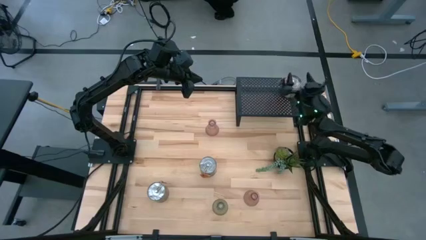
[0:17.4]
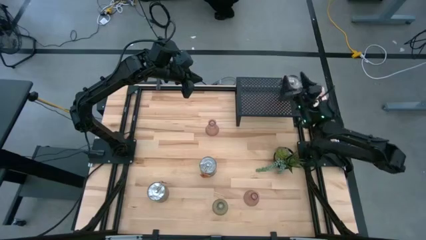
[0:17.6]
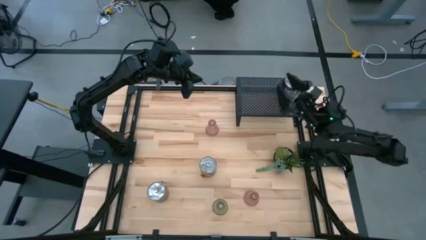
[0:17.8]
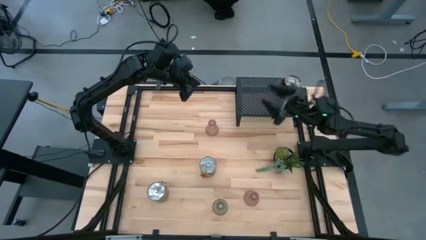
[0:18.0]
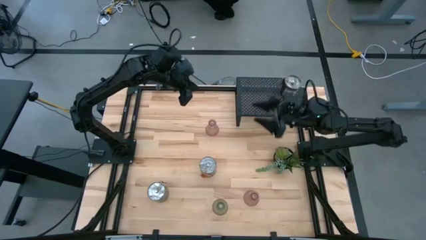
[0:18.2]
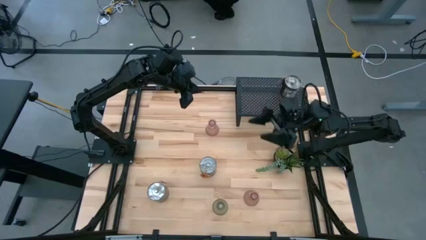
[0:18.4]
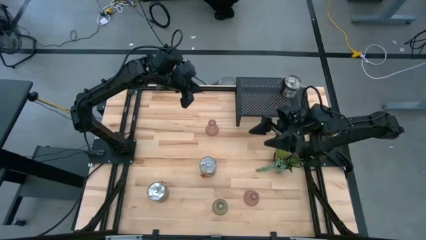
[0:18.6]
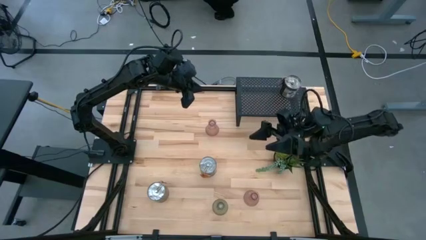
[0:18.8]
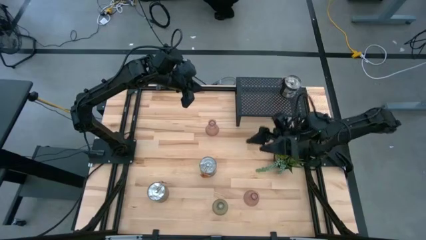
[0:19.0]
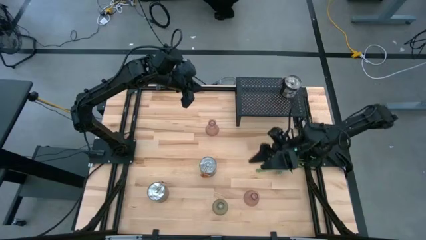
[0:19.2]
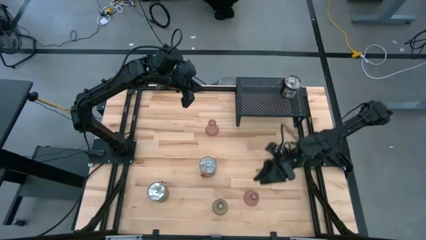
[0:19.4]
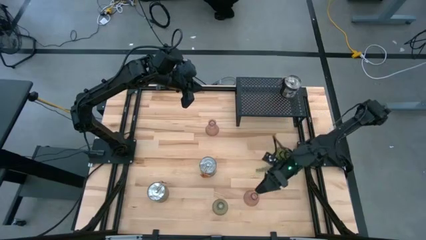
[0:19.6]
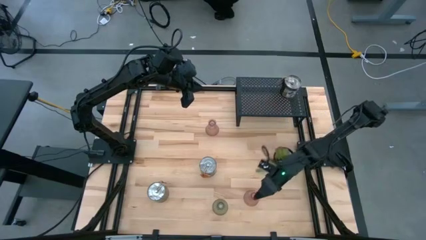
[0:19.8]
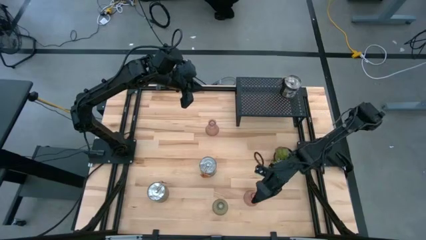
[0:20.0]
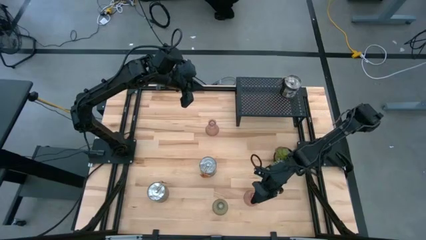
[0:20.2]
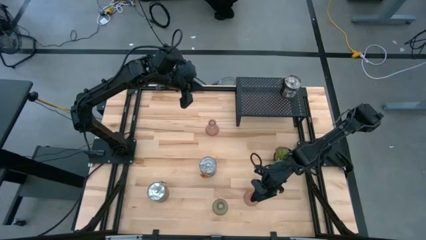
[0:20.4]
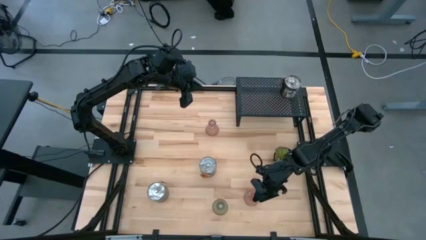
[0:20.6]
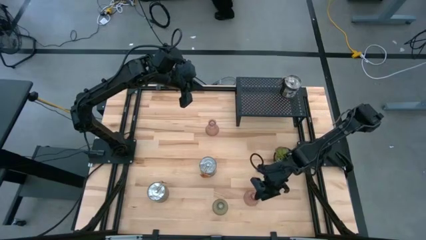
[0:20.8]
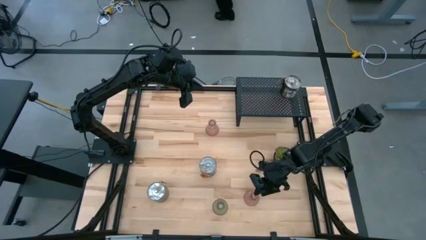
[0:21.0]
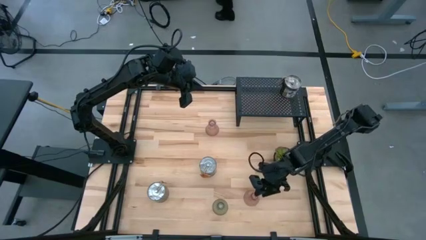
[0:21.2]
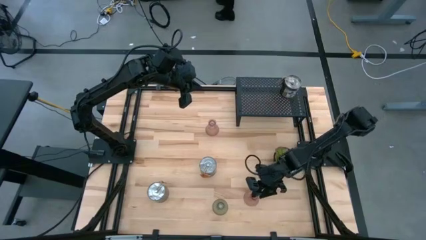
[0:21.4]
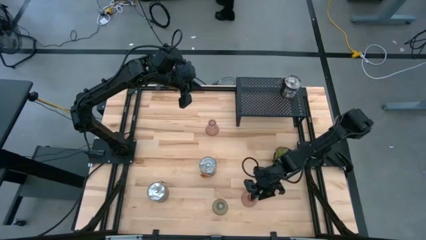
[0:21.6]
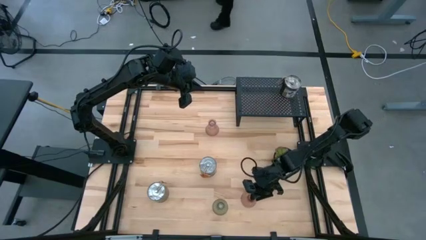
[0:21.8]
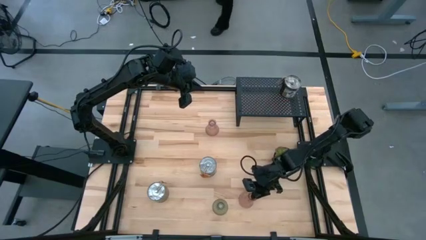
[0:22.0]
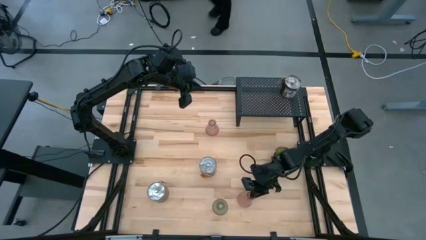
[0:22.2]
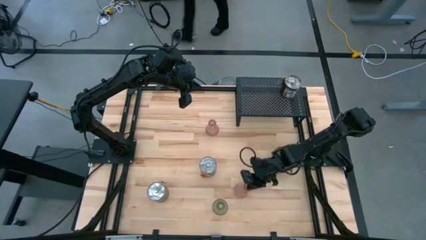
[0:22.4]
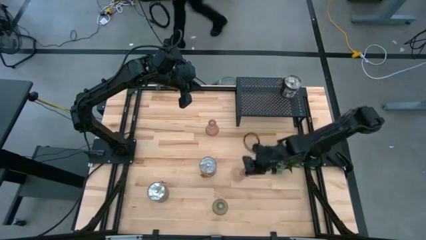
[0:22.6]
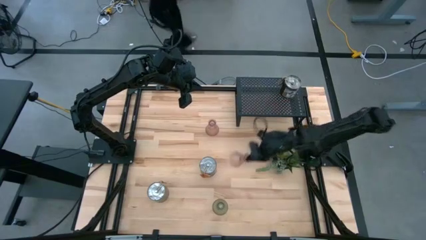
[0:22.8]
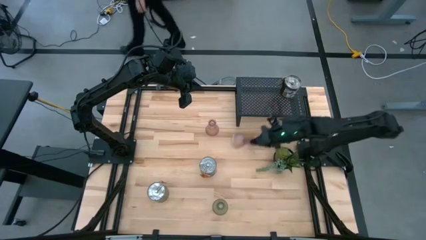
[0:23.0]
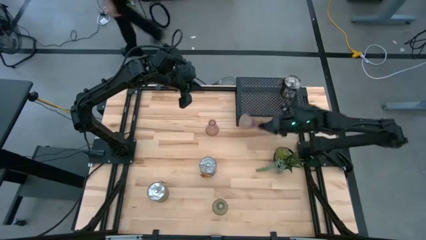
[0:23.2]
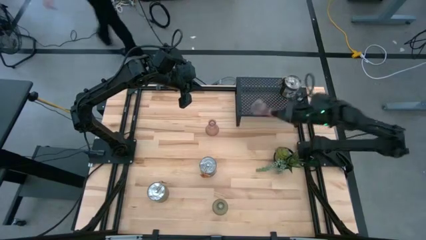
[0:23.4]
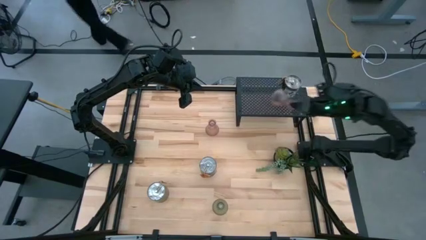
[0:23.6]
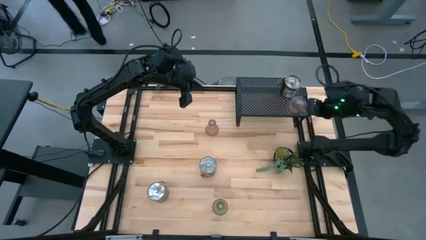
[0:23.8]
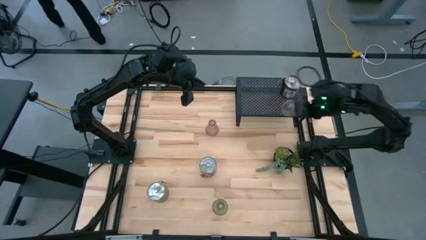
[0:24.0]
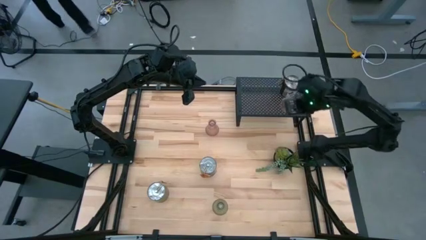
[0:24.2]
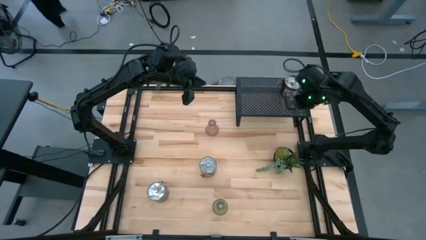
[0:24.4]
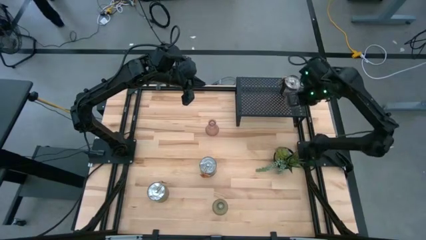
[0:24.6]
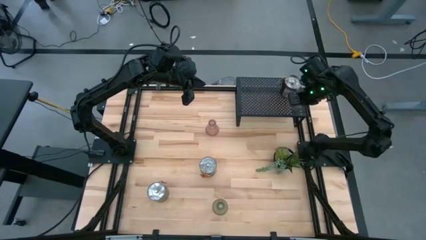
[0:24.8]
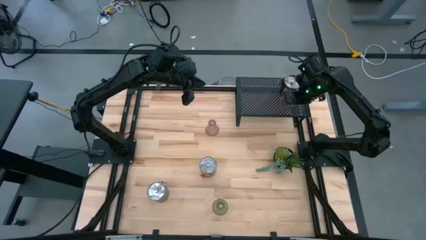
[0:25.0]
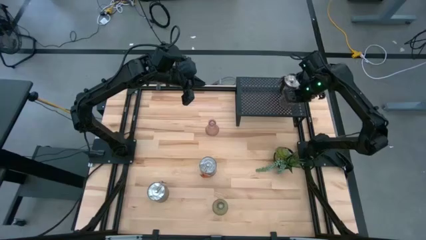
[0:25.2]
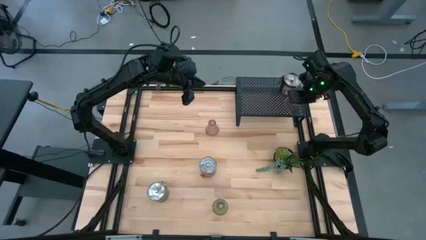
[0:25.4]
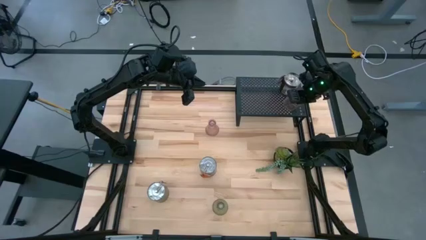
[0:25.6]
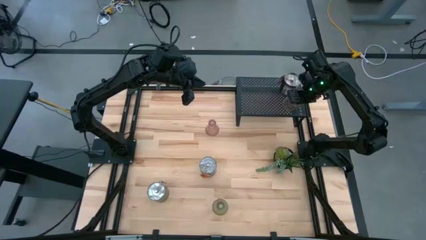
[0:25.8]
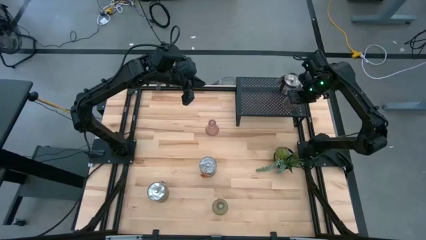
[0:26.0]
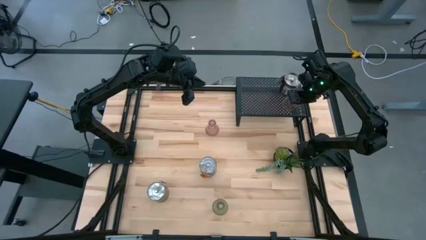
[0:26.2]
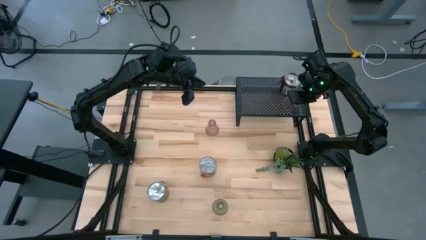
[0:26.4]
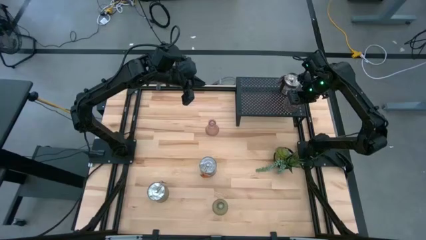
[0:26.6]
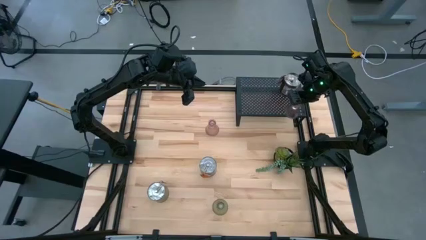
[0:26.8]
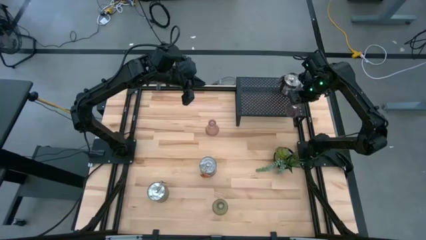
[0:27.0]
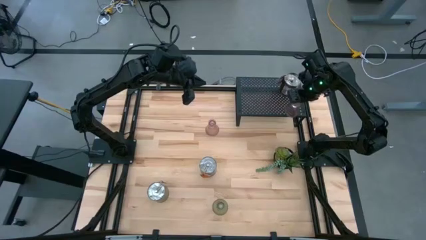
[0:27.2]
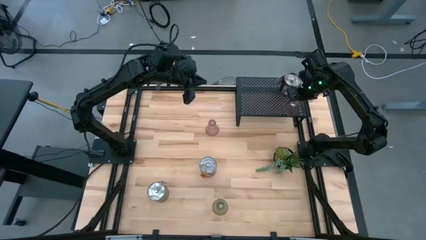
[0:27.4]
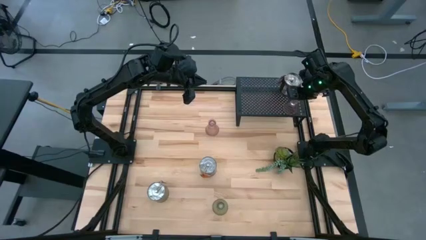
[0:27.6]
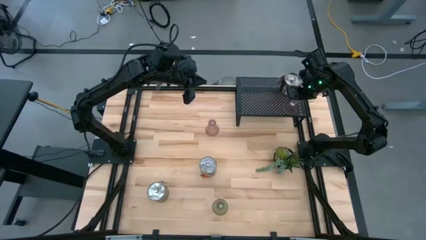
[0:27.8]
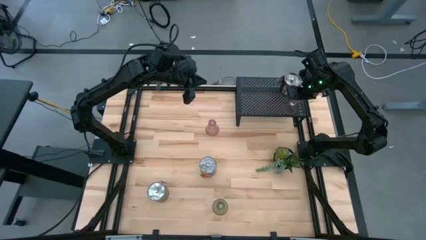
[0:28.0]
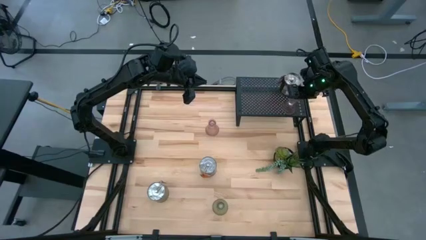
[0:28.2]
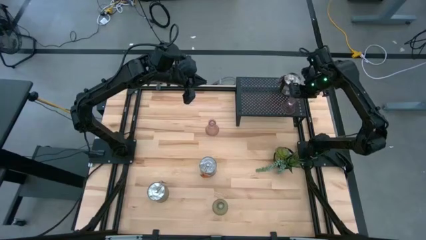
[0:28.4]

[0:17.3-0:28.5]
Task: Pick & Place candle stick holders
Put the bottom pink candle holder on the shelf
